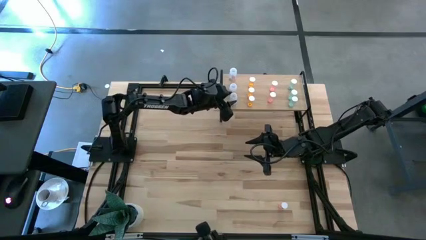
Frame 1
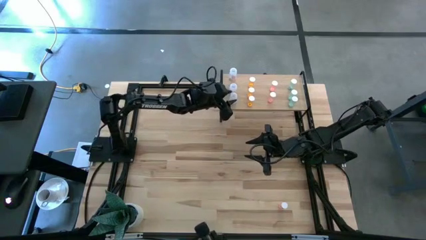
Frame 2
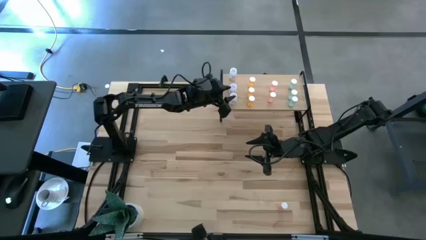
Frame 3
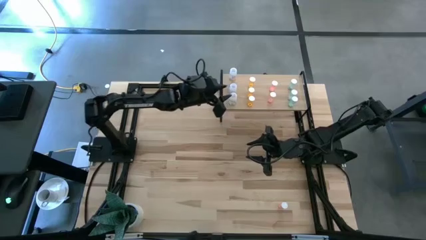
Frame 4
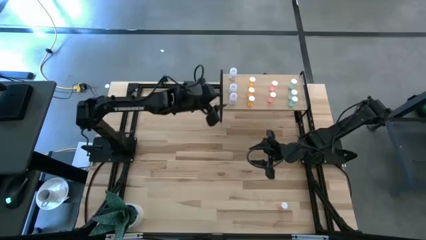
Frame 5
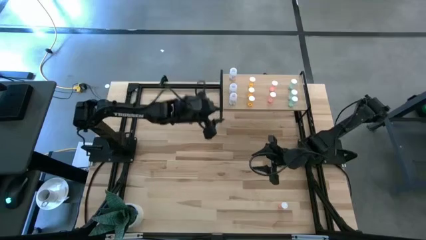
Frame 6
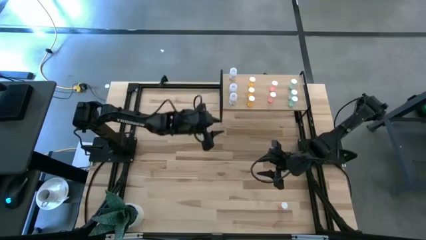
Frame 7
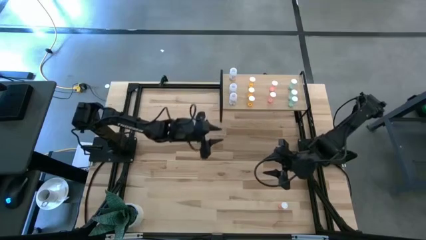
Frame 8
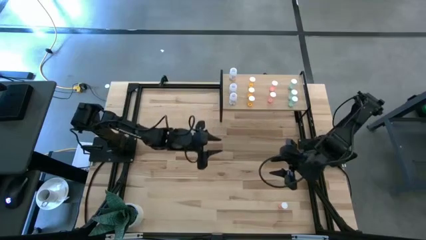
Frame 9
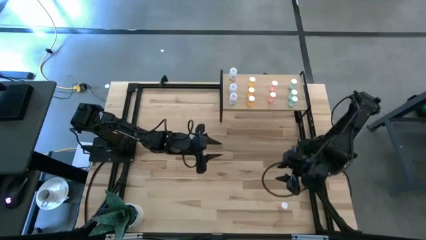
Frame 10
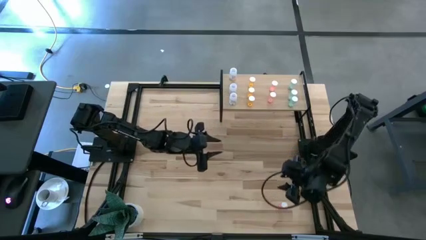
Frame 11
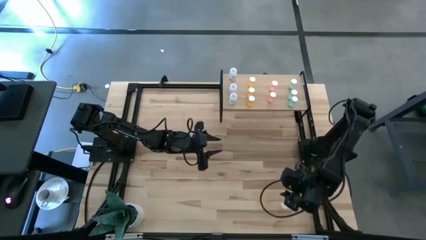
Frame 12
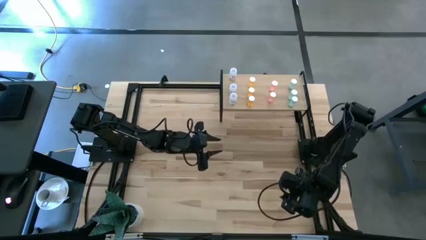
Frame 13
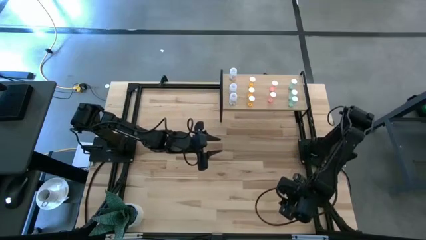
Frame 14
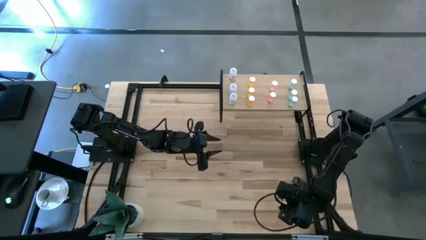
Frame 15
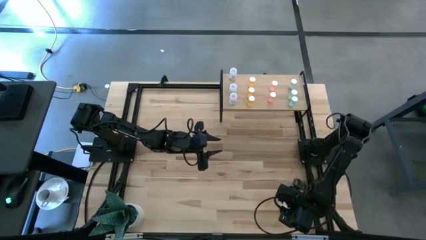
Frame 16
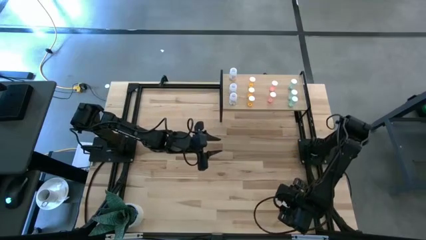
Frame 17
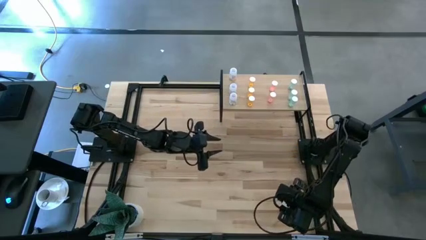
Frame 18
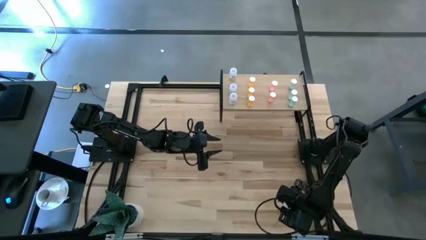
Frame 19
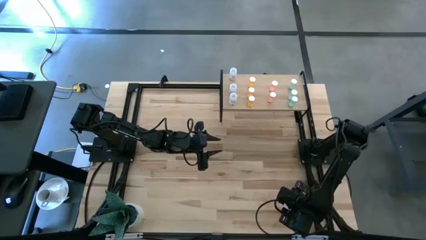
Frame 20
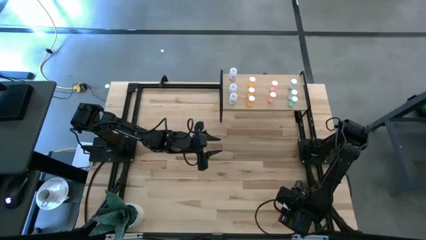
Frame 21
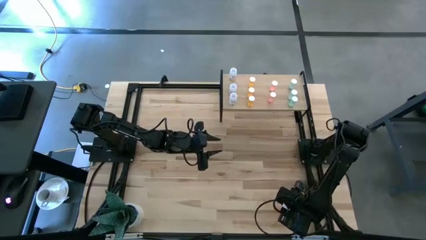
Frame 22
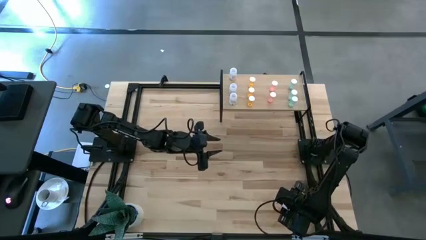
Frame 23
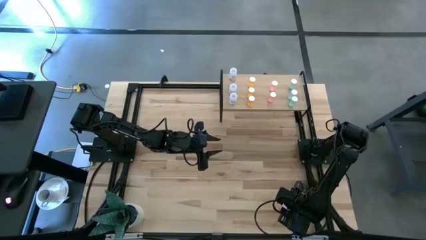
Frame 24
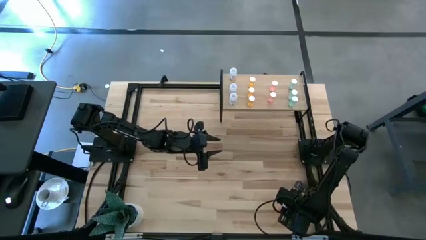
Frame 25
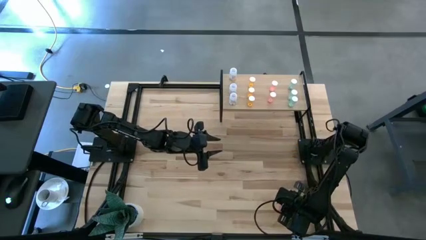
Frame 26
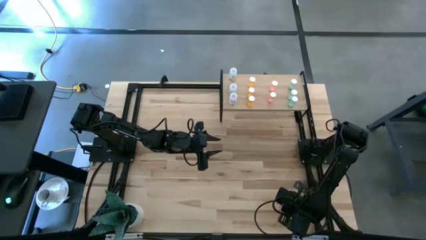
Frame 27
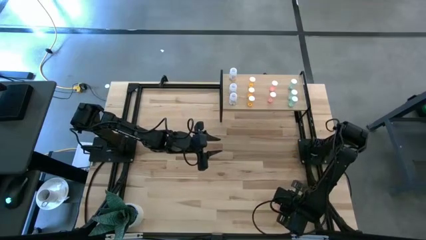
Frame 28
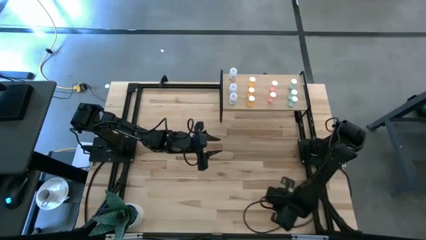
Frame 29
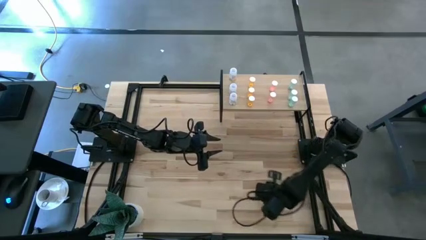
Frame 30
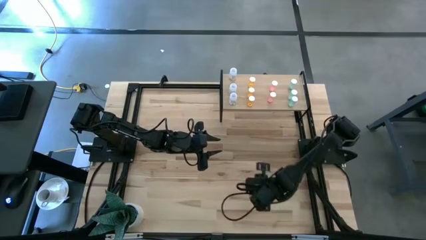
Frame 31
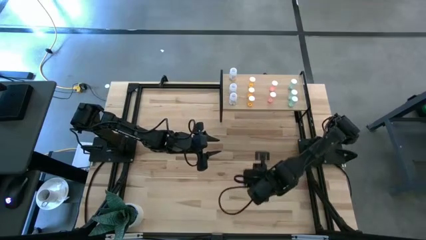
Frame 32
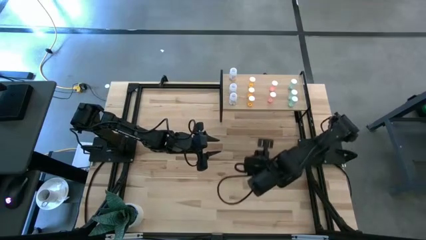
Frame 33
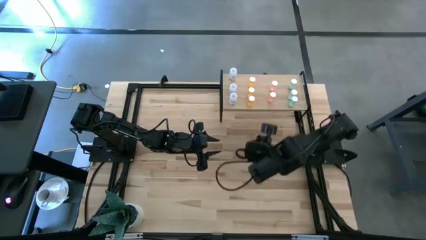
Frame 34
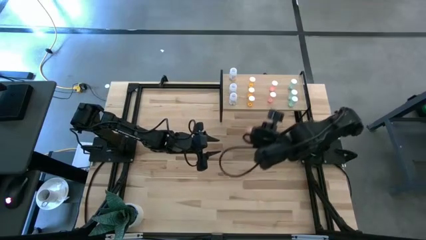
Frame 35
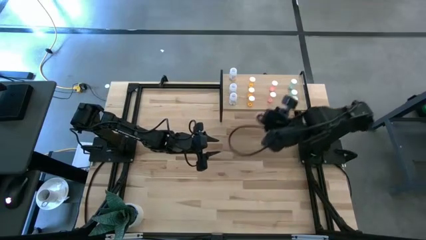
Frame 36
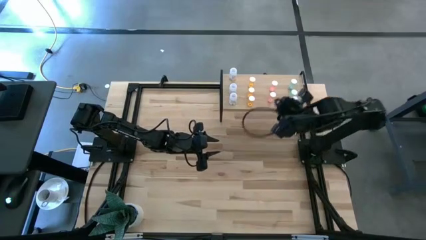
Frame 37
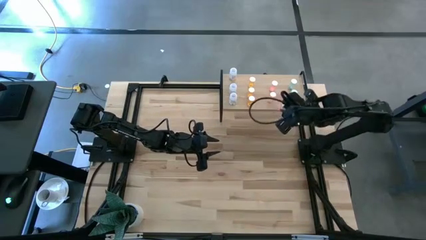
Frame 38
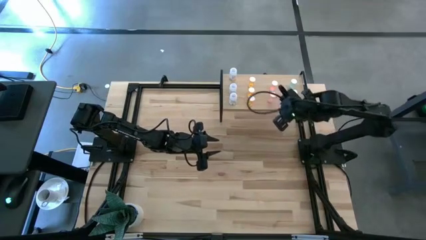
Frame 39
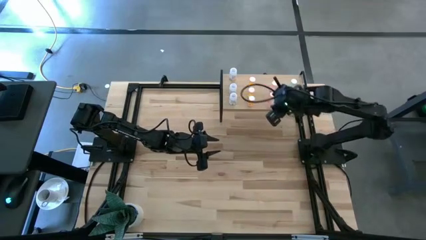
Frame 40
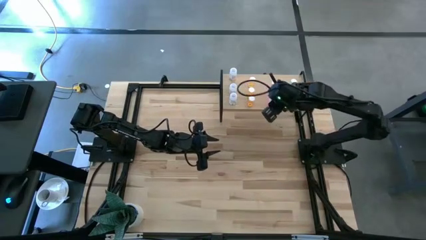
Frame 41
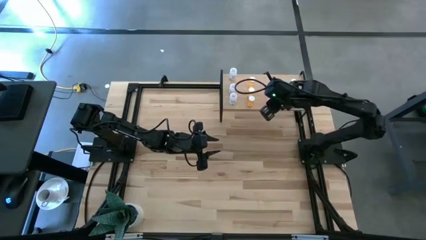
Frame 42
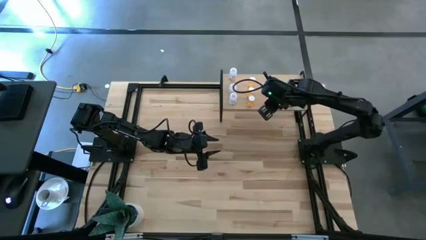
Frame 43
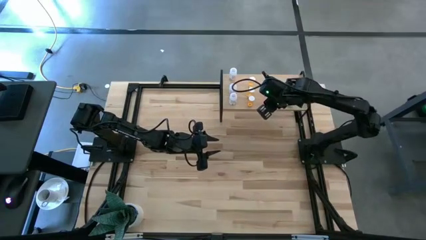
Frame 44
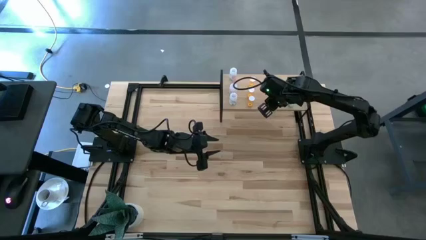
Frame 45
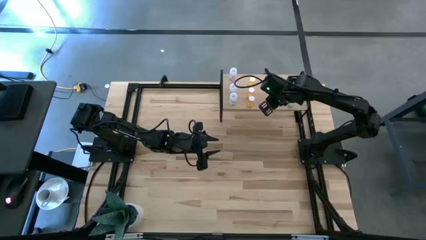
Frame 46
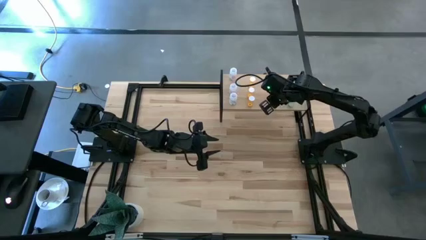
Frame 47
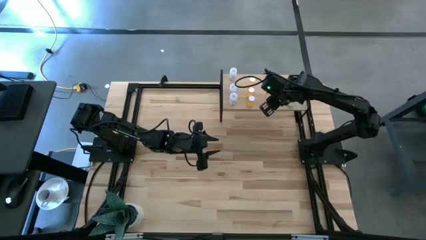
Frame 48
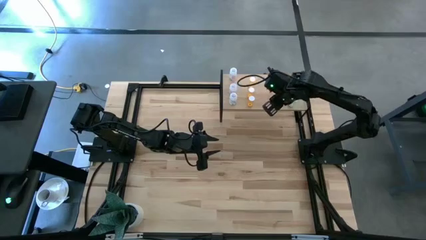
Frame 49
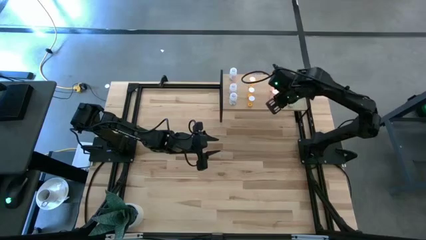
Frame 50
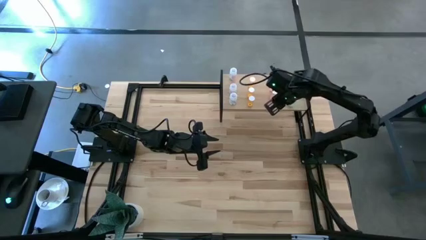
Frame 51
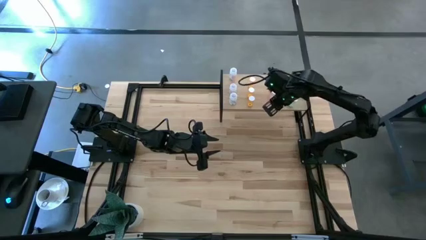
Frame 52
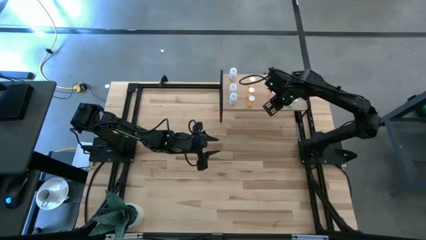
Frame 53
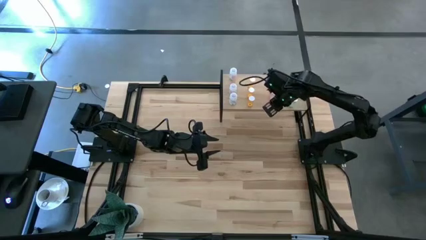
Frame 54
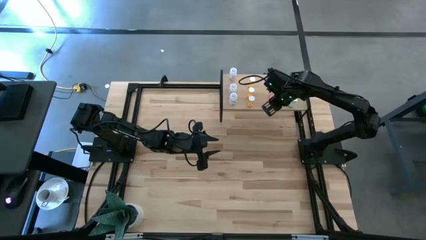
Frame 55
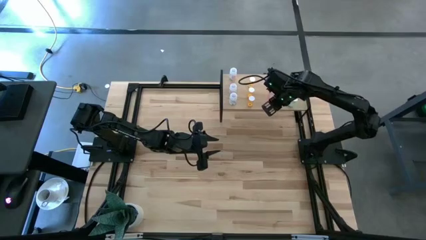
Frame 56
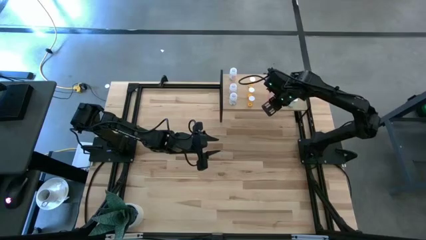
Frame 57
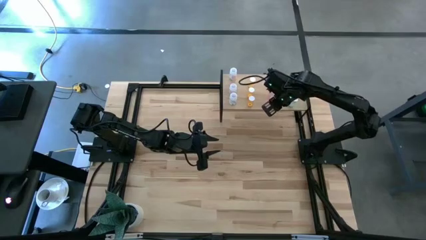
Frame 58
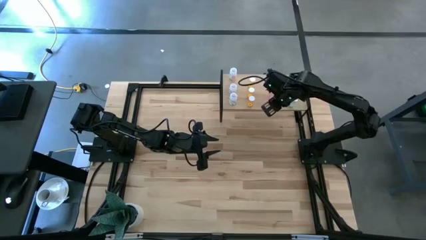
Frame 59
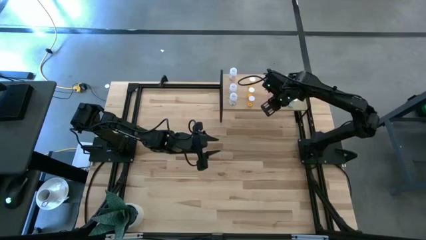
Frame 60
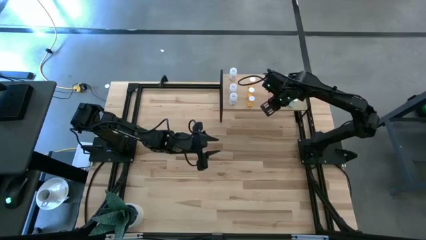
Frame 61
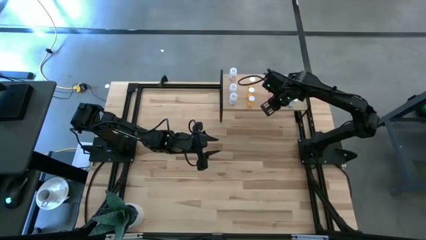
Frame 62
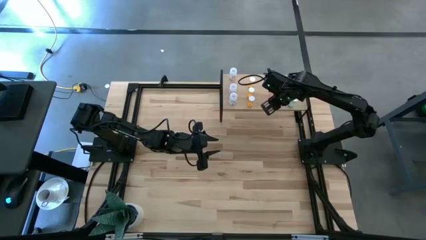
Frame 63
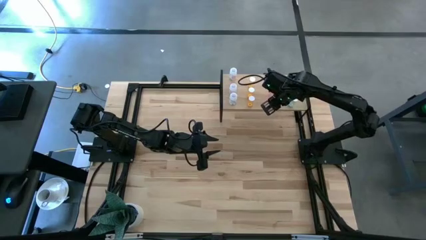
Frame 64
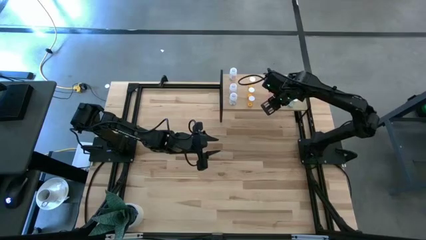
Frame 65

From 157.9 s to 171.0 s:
Task: Pick and place medicine bottles onto shelf by color
Put the pink pill bottle on the shelf aligned with the other pink pill bottle
